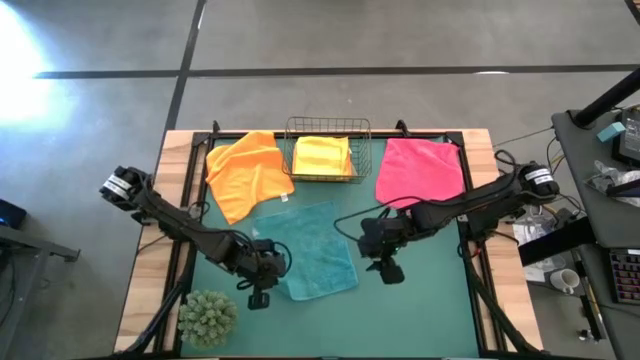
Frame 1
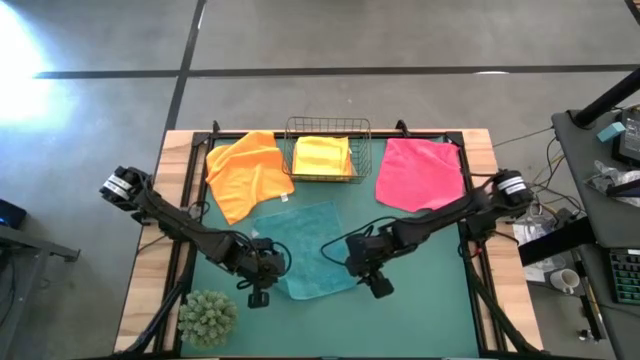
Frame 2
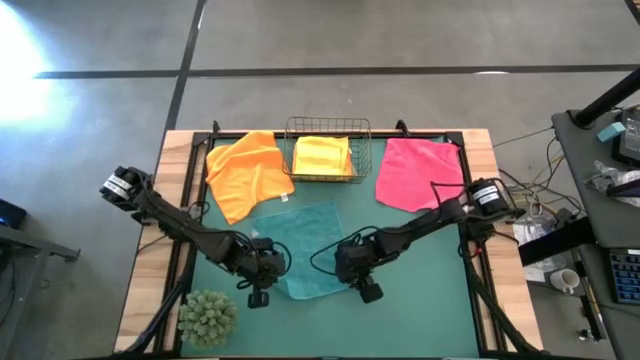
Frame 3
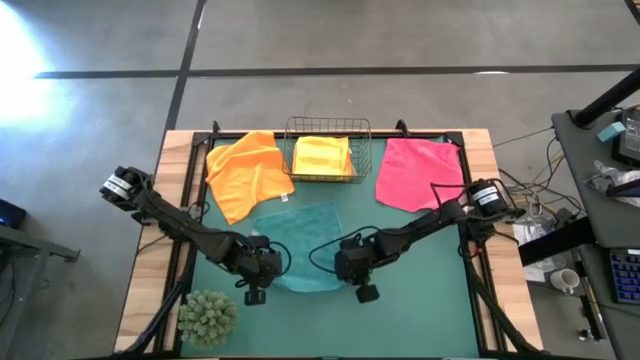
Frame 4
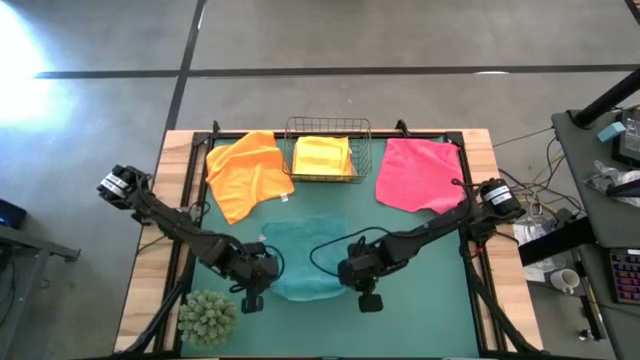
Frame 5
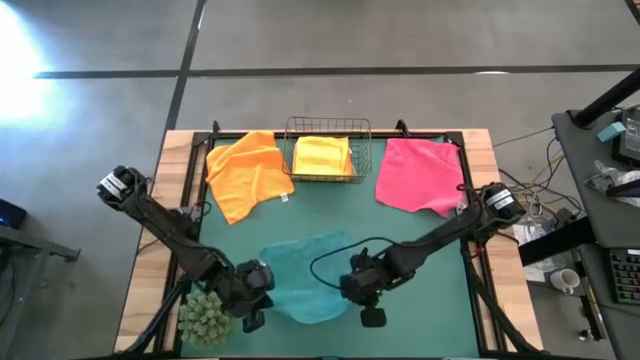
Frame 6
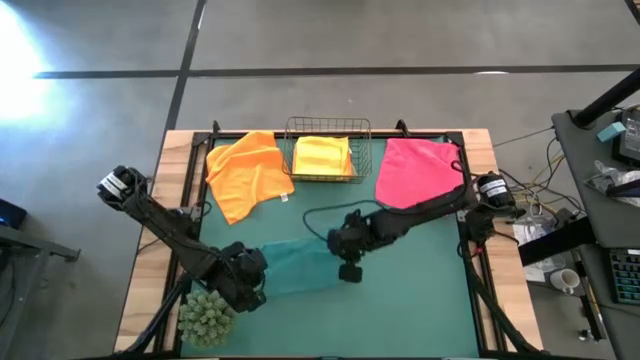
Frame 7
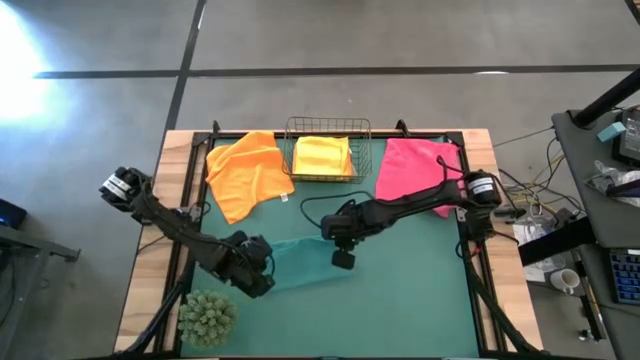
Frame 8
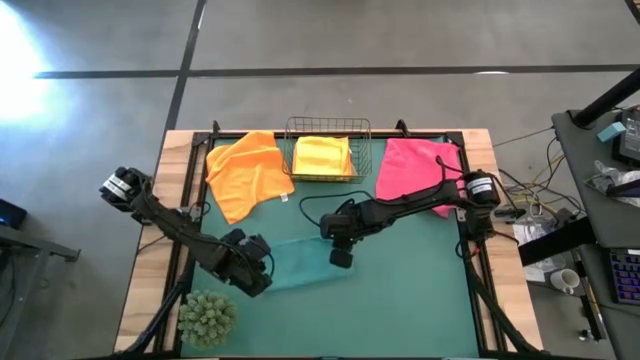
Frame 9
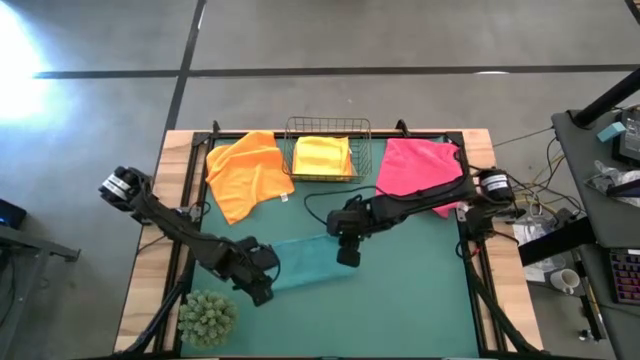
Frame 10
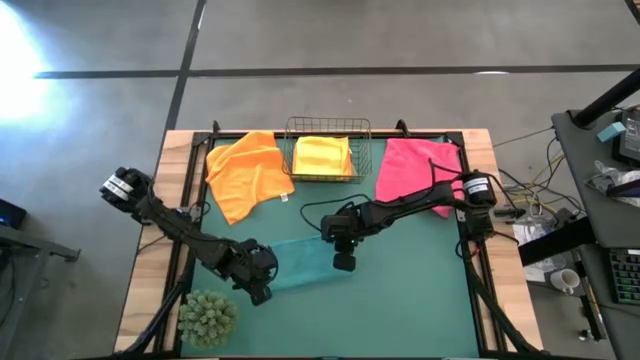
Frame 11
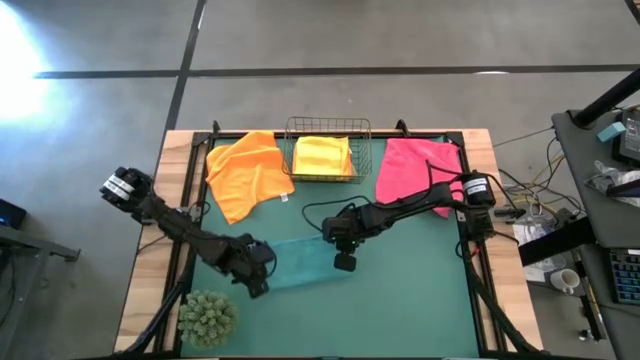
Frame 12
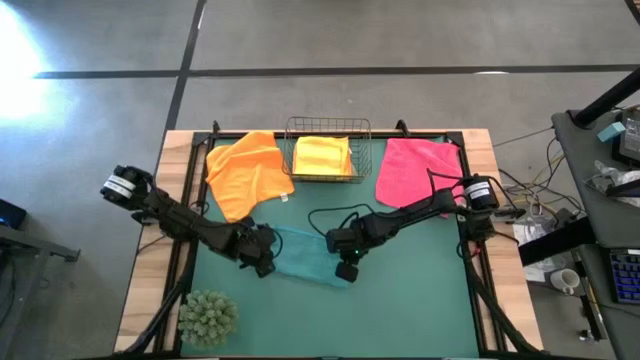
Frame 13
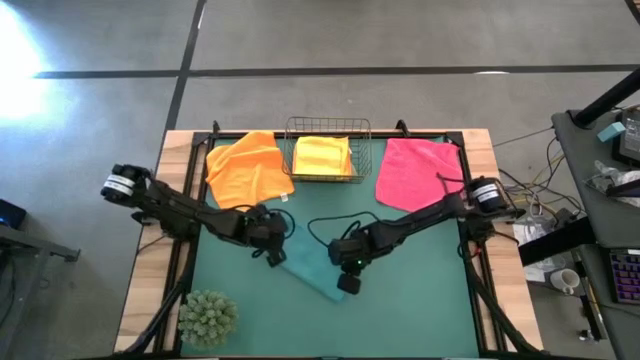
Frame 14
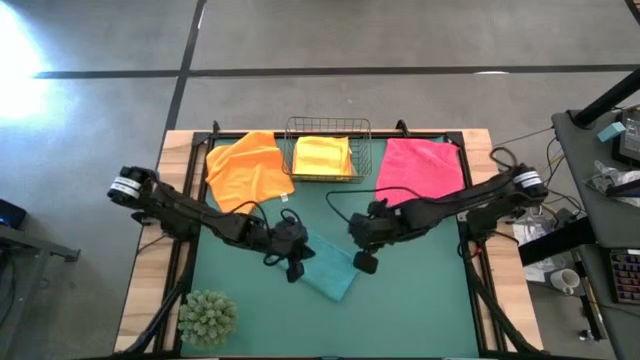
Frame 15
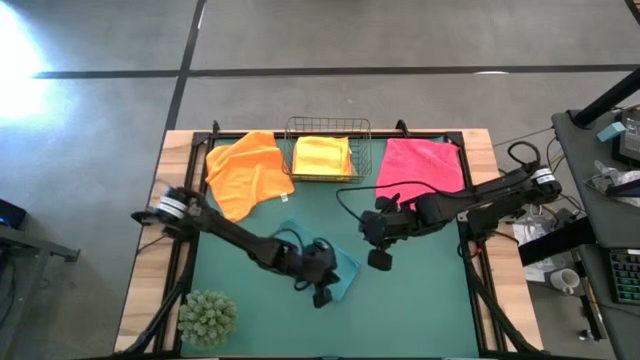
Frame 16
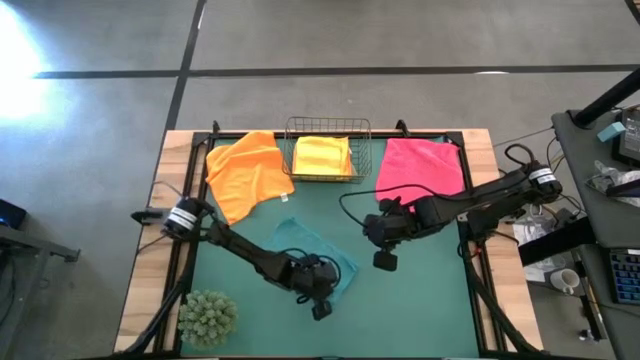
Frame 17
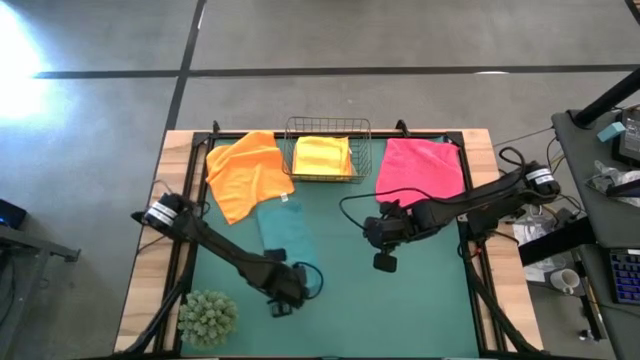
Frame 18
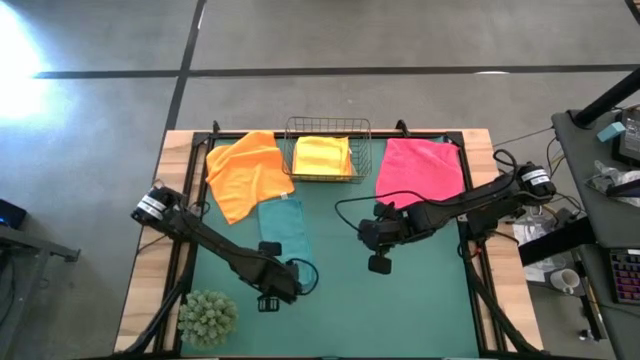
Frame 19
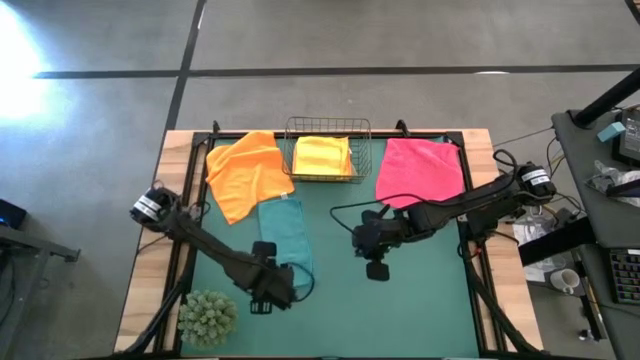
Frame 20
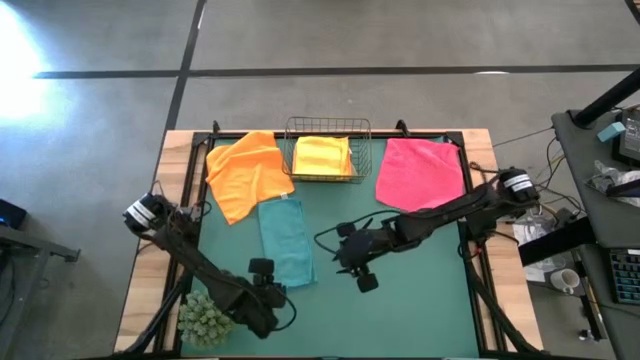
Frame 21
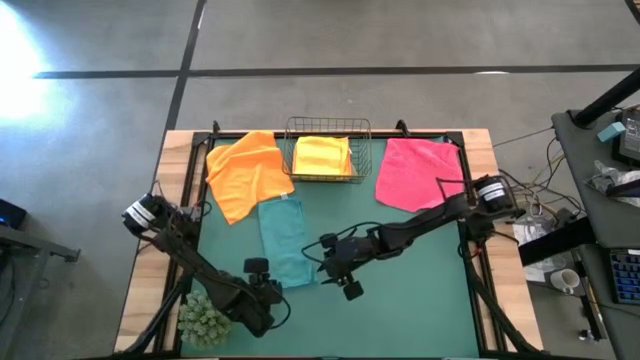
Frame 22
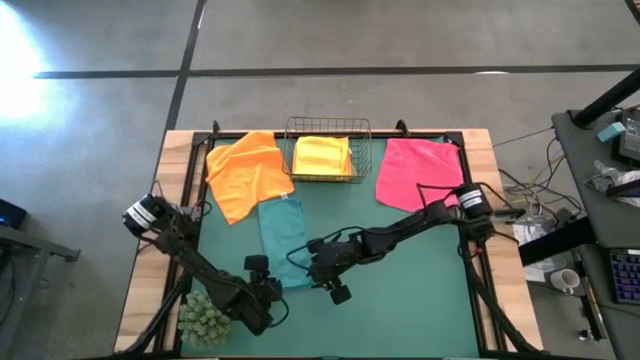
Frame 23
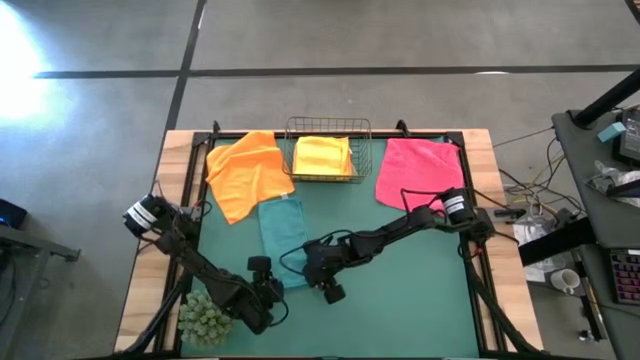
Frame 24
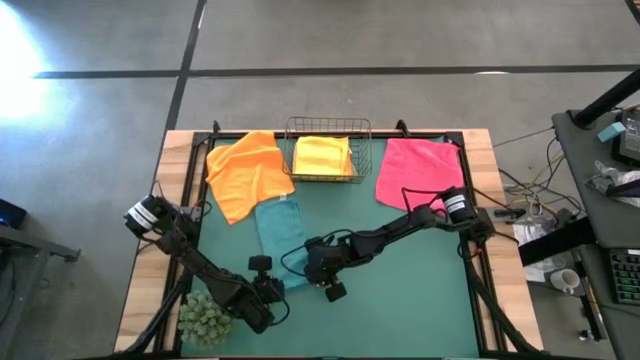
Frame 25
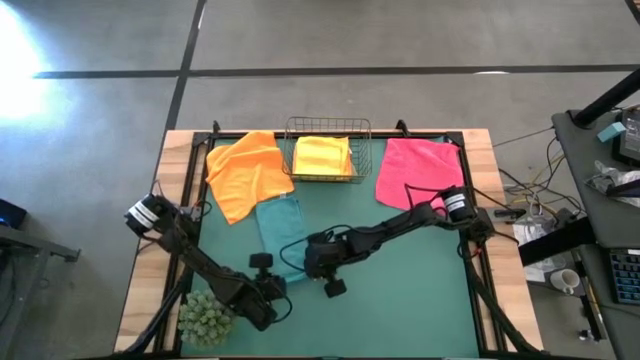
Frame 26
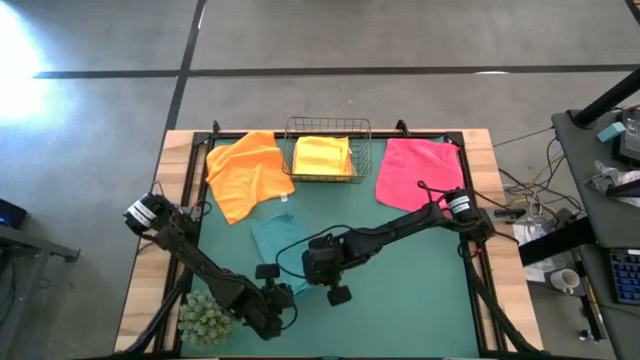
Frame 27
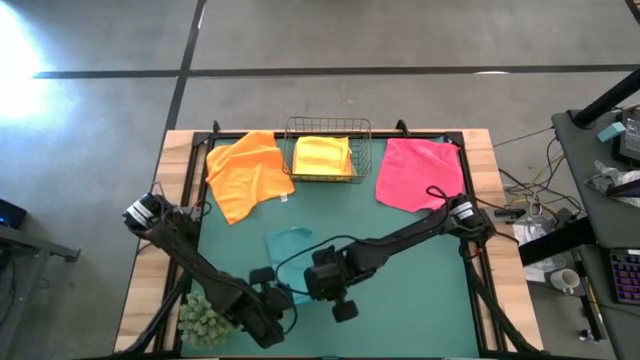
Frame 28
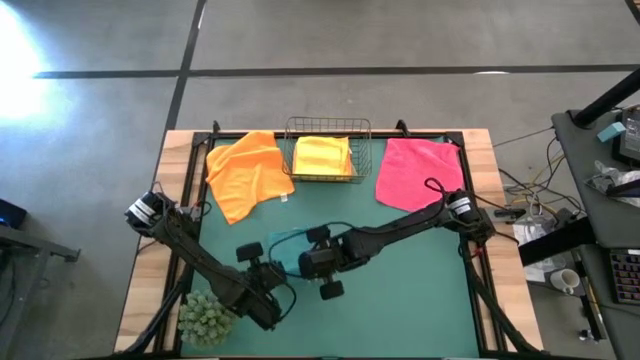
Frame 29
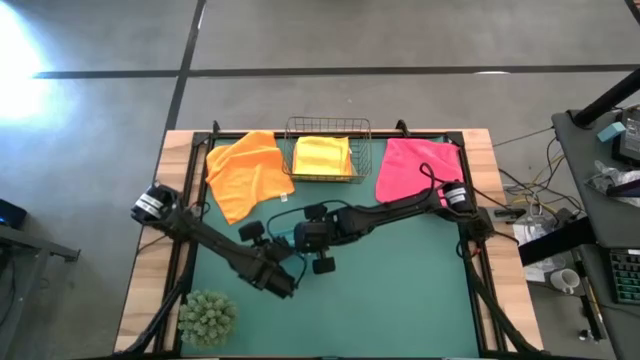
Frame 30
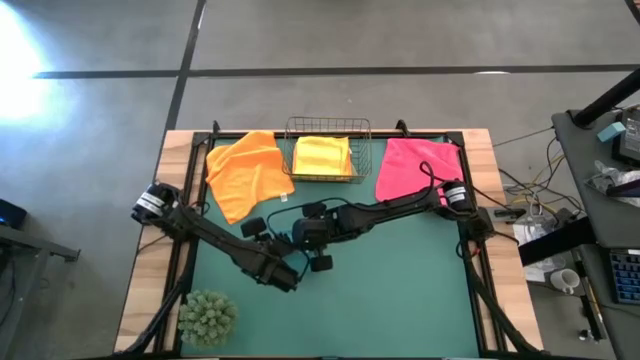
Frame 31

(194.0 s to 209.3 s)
Task: Fold microfiber towels
Fold the green microfiber cloth

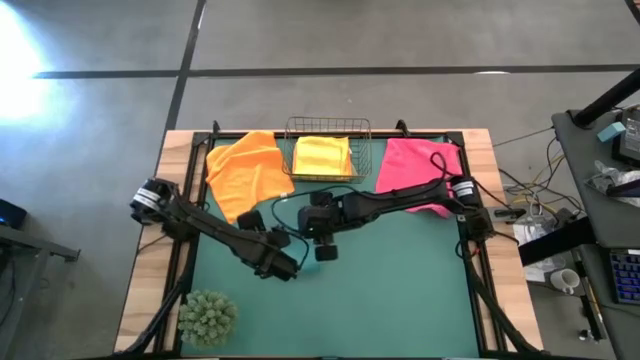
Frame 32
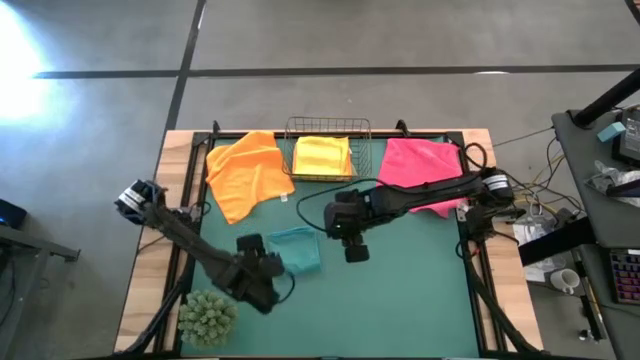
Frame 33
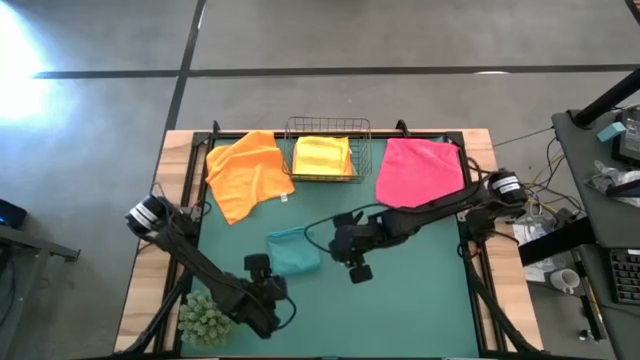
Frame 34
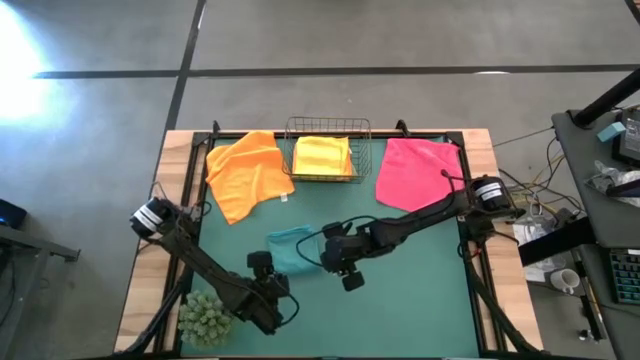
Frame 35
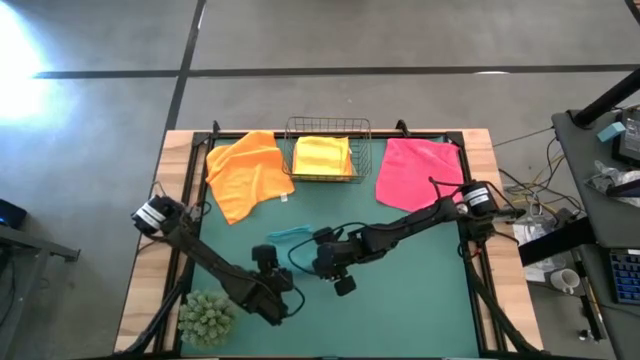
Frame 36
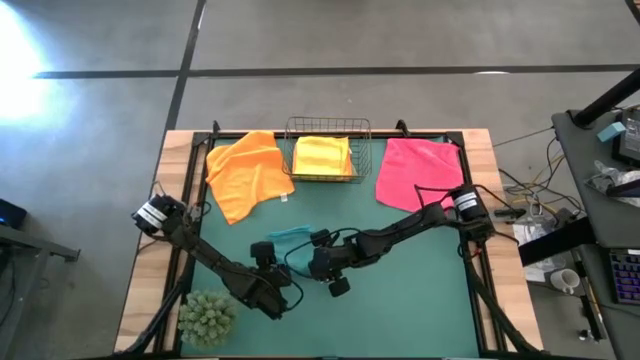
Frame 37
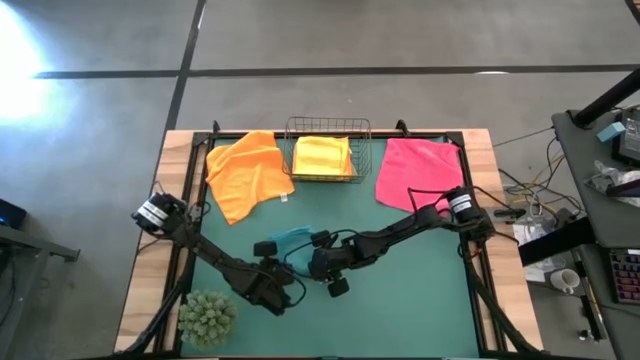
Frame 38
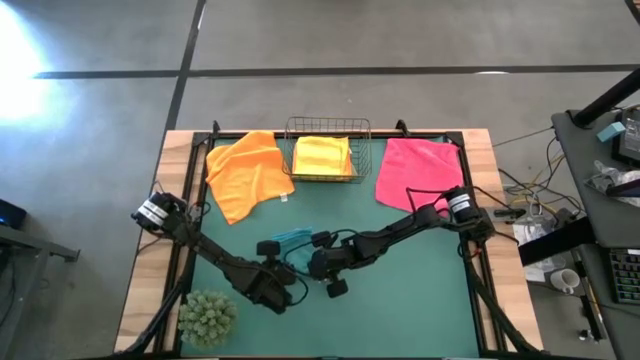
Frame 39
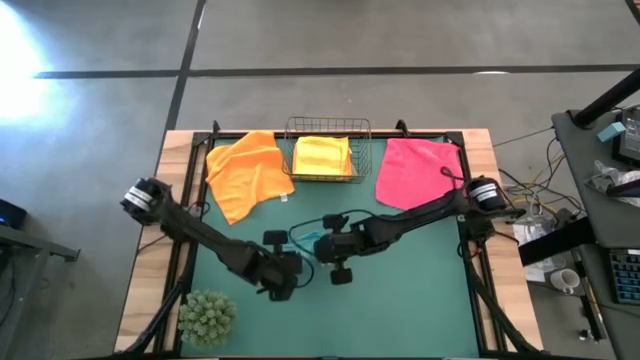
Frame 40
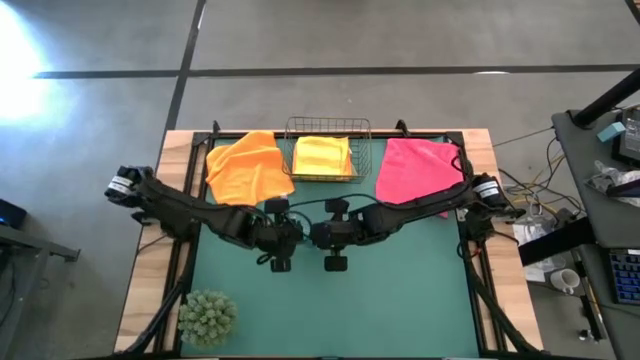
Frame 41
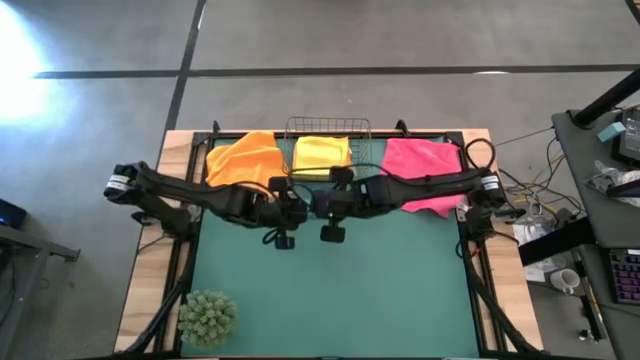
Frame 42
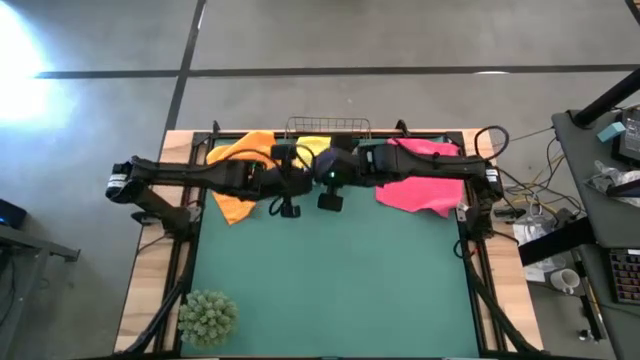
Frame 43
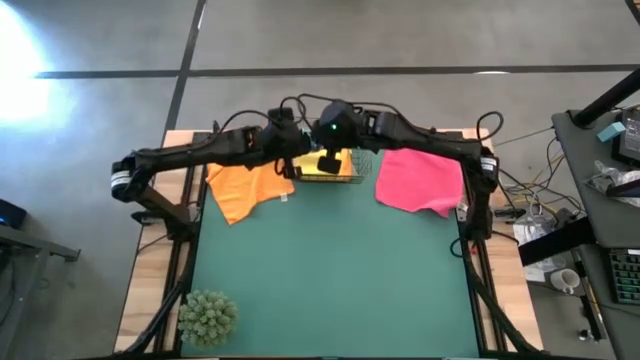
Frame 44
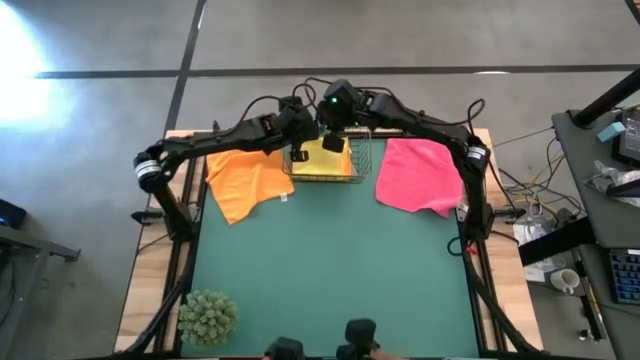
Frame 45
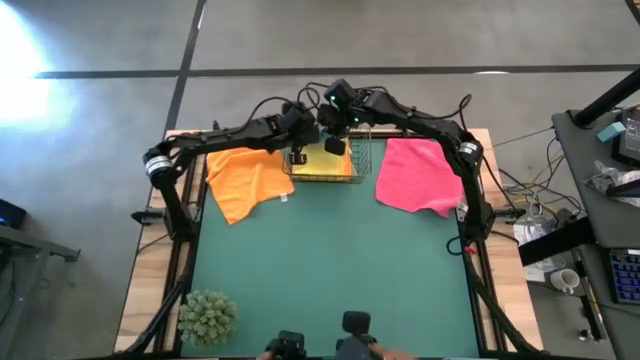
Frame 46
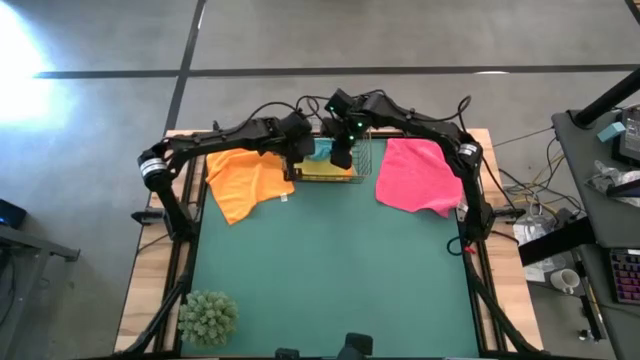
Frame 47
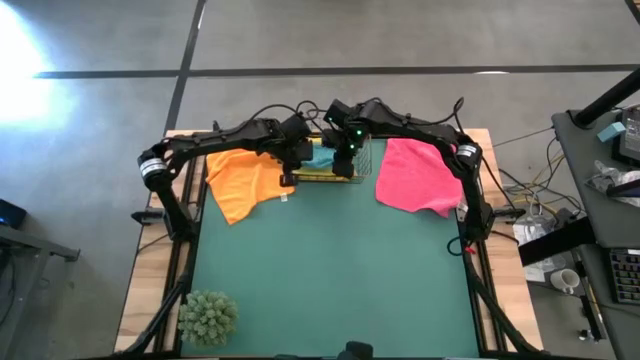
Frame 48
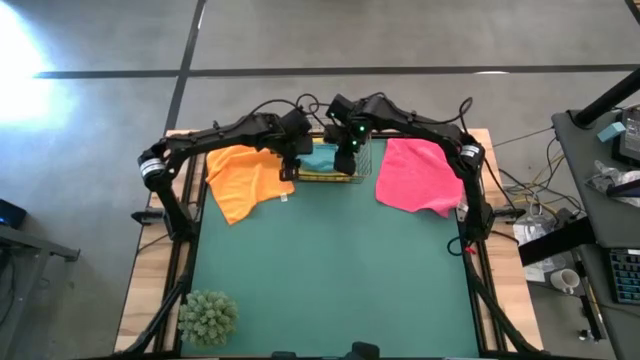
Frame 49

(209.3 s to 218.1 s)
Put the blue microfiber cloth into the wire basket
